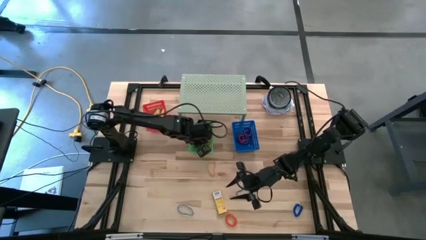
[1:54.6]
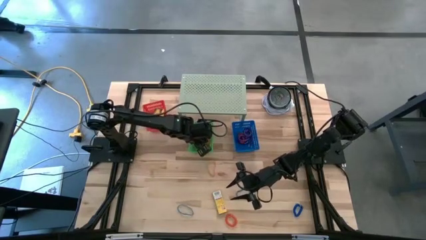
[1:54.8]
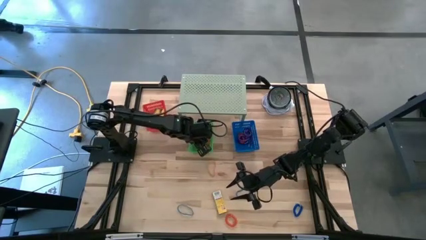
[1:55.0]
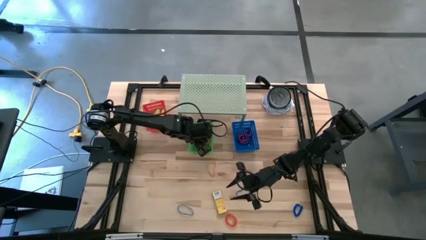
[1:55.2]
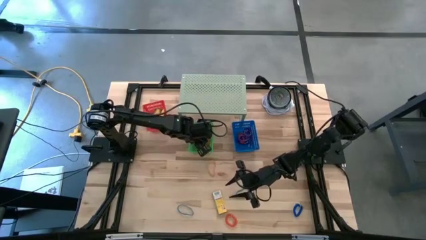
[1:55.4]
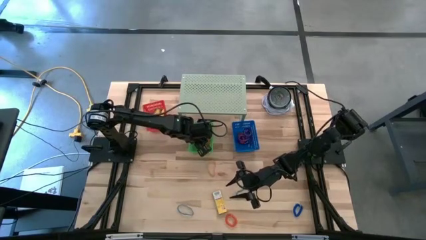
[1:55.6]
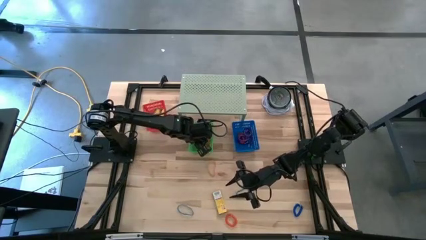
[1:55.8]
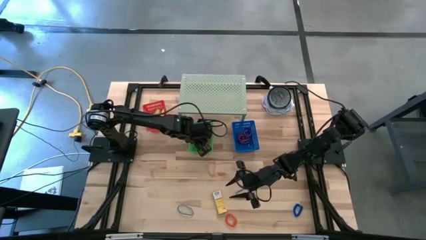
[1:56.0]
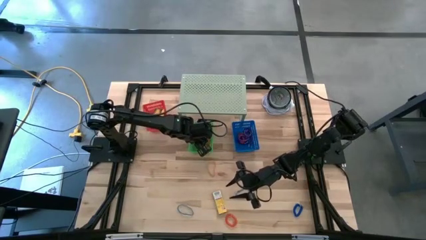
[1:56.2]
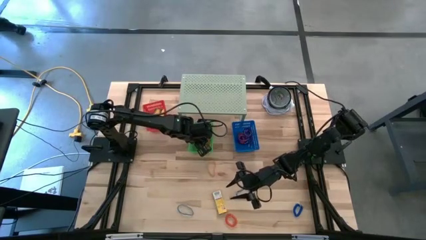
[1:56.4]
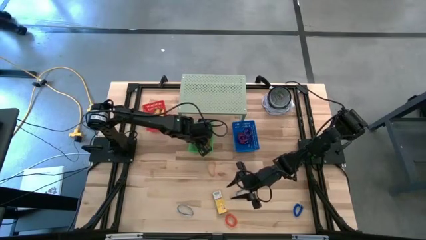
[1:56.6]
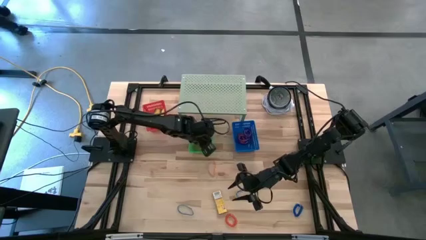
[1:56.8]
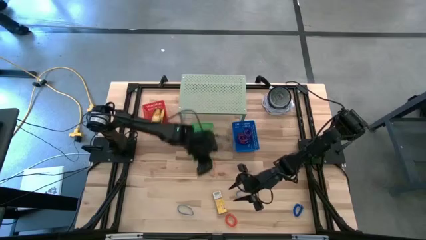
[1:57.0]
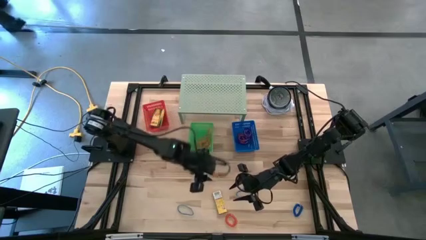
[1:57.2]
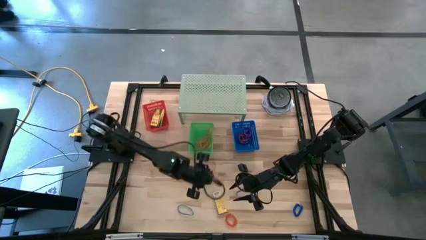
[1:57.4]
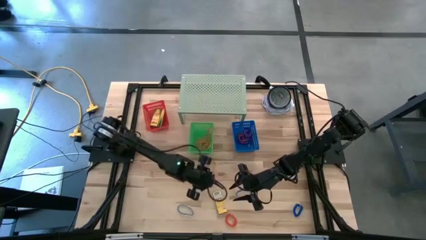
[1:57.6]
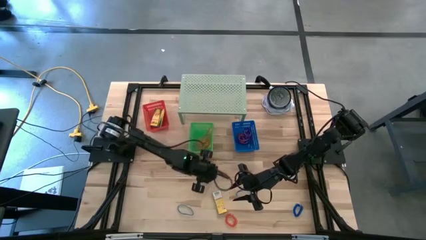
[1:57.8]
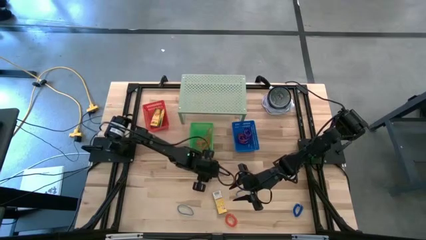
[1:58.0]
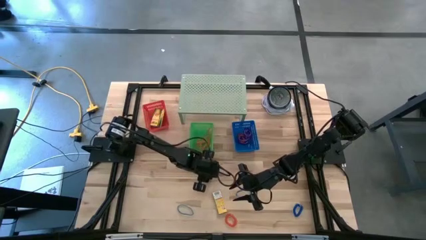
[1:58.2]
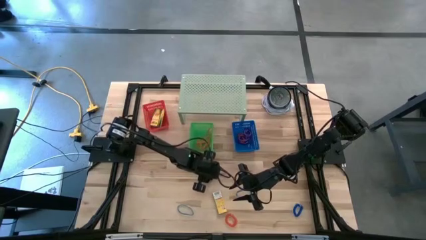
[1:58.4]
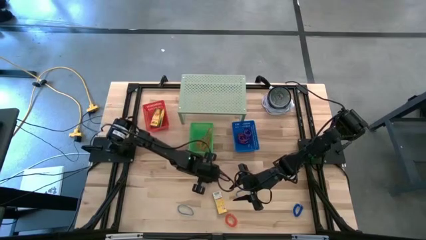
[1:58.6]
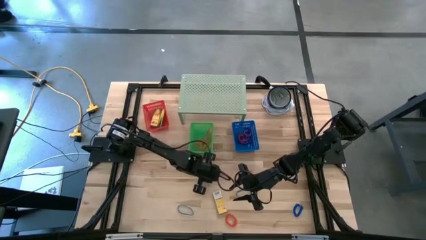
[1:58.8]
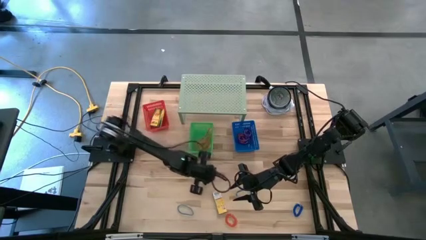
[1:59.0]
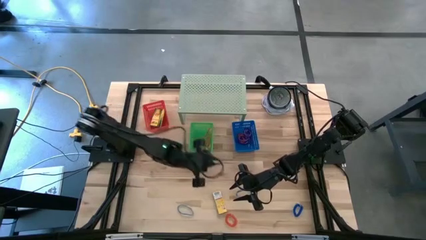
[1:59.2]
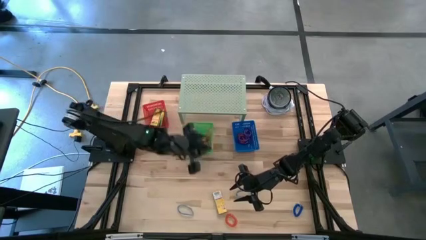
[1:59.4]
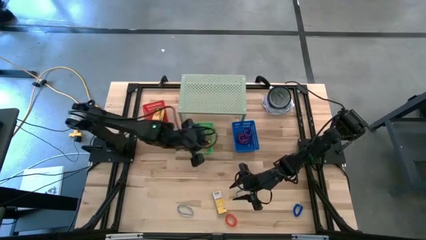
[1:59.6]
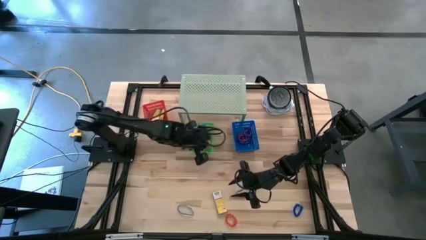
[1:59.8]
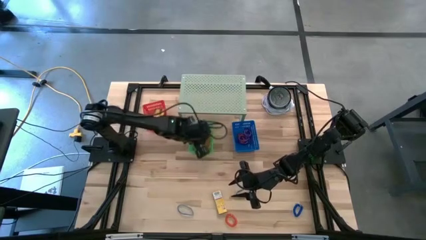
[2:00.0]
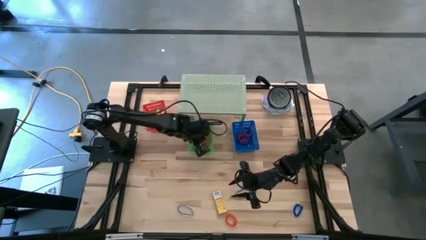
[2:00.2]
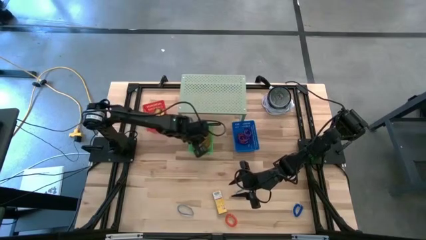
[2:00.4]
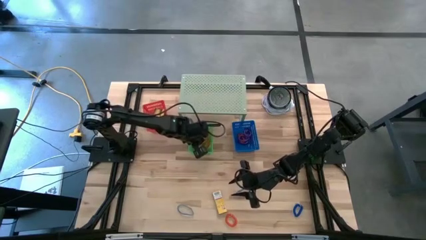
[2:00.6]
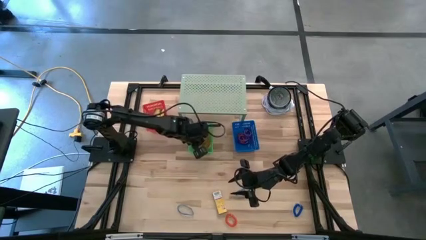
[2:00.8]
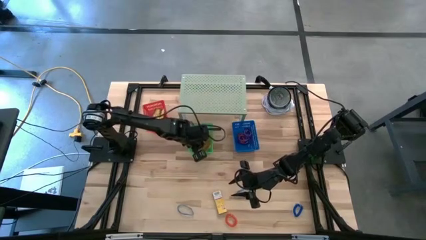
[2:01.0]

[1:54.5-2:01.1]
Task: Pick & Place Office Desk Supplies
Put the orange rubber band into the green bin

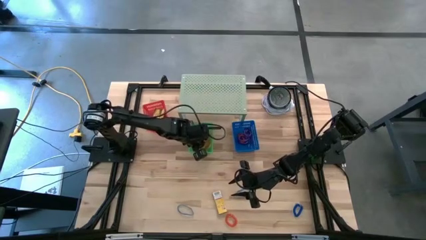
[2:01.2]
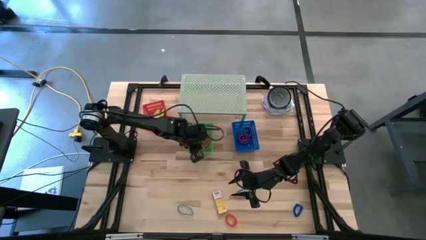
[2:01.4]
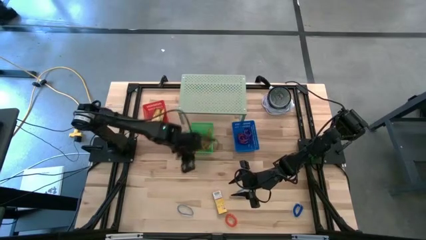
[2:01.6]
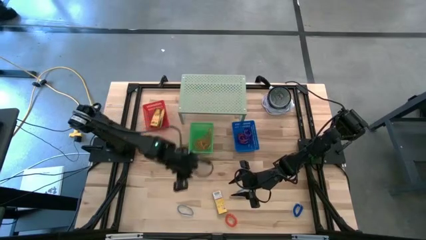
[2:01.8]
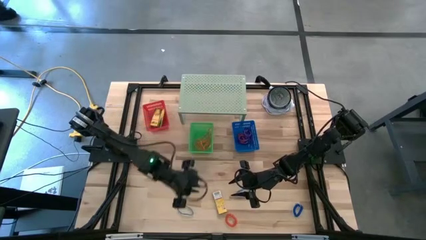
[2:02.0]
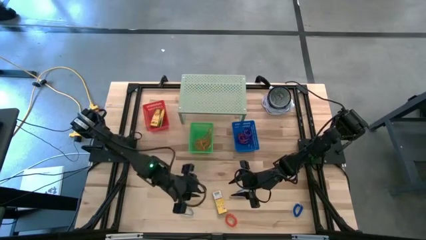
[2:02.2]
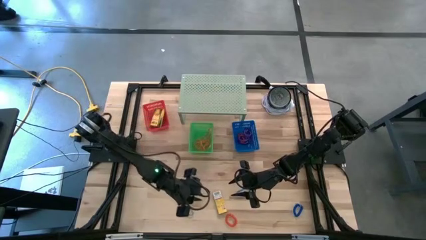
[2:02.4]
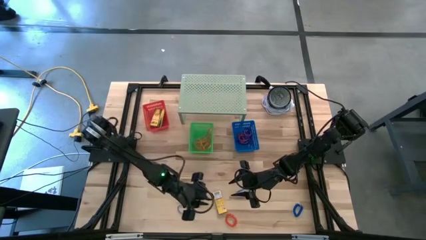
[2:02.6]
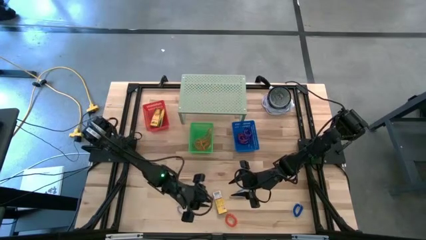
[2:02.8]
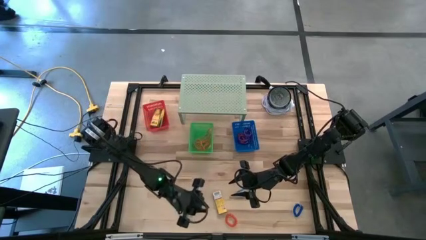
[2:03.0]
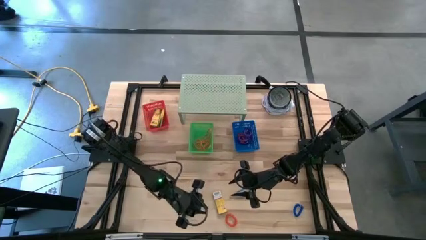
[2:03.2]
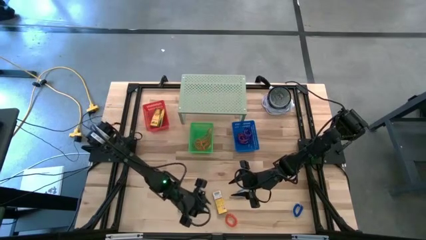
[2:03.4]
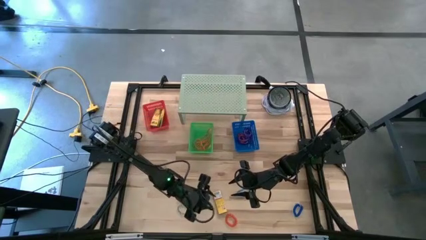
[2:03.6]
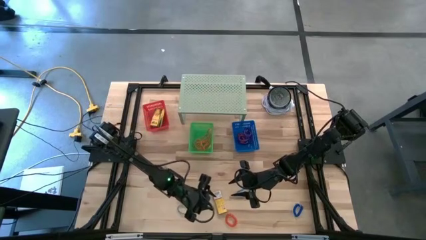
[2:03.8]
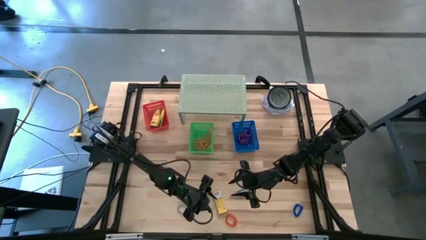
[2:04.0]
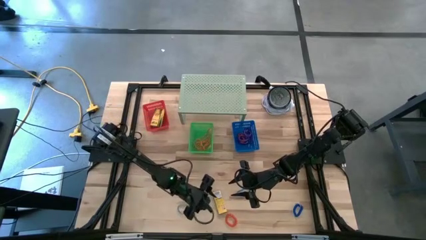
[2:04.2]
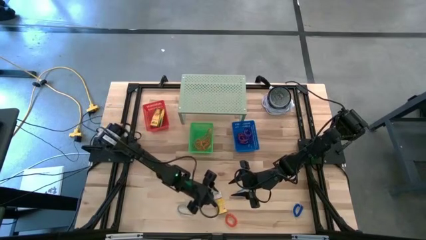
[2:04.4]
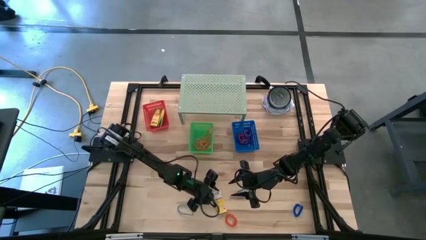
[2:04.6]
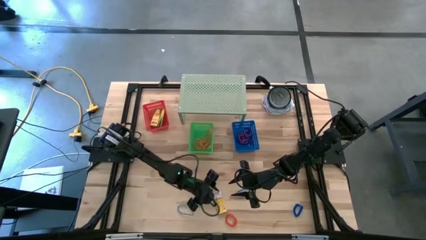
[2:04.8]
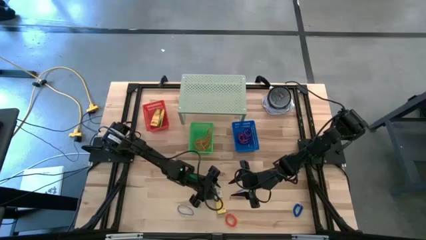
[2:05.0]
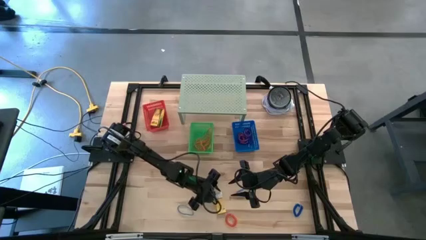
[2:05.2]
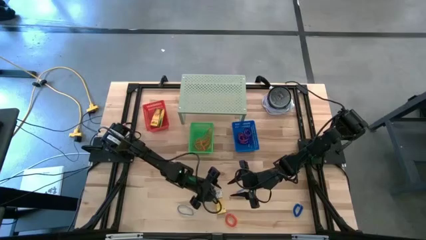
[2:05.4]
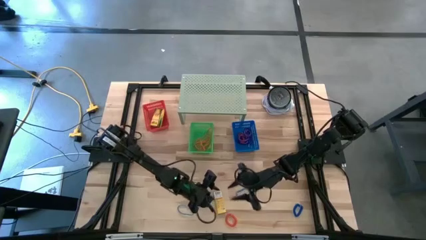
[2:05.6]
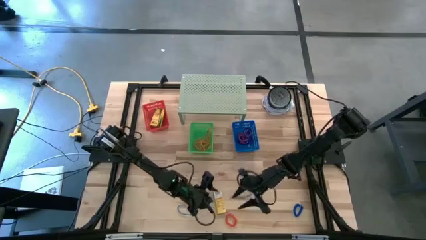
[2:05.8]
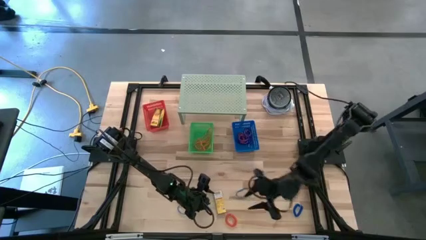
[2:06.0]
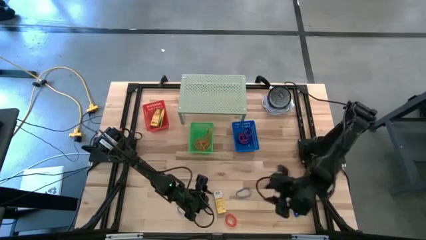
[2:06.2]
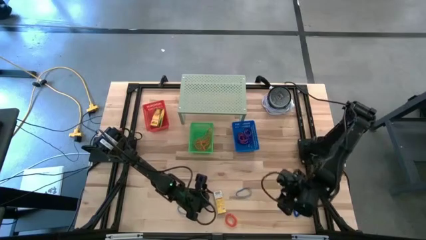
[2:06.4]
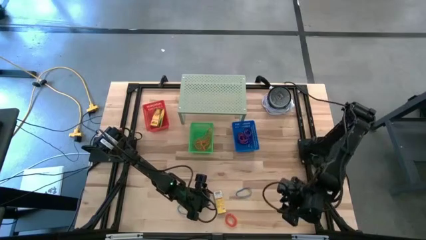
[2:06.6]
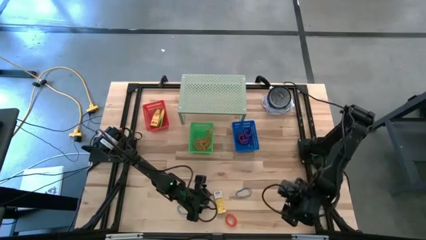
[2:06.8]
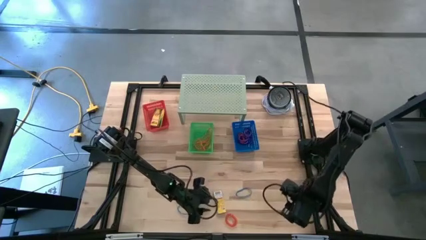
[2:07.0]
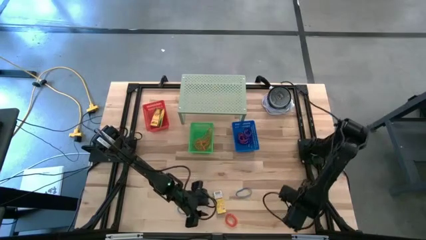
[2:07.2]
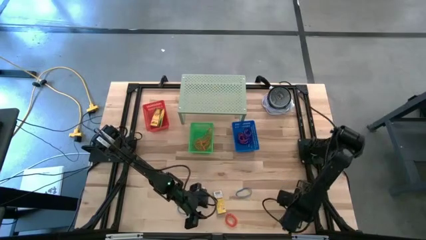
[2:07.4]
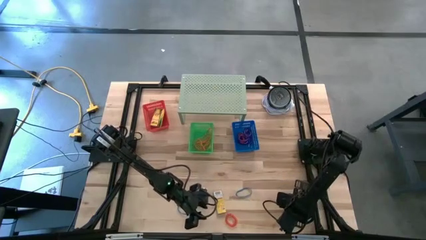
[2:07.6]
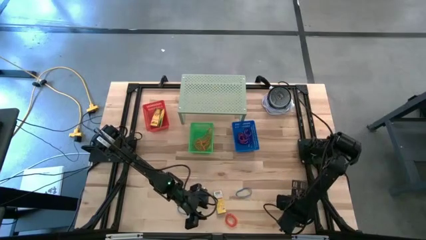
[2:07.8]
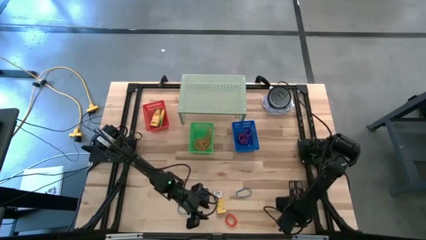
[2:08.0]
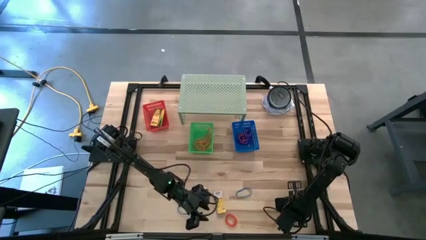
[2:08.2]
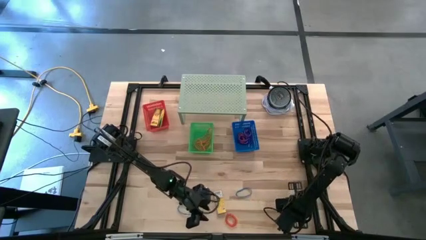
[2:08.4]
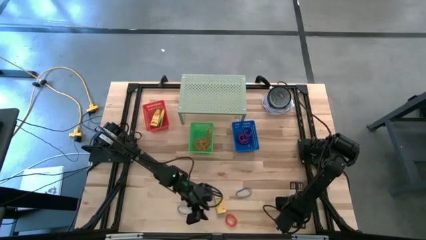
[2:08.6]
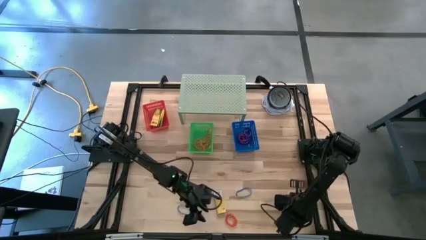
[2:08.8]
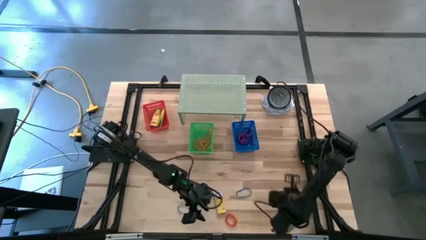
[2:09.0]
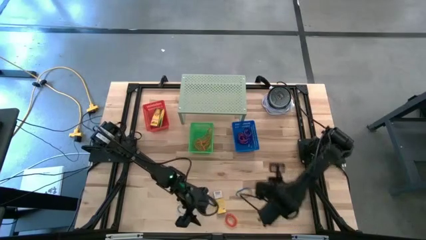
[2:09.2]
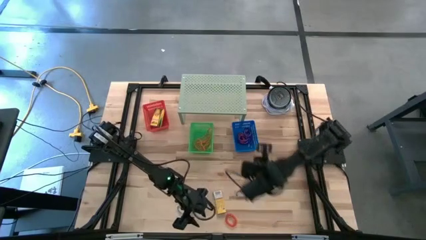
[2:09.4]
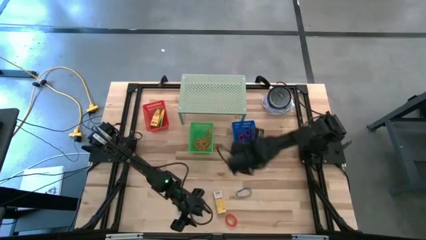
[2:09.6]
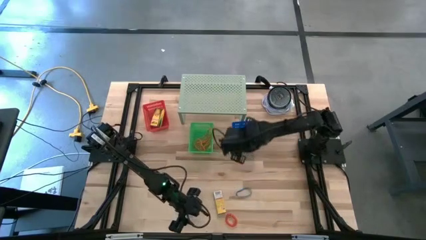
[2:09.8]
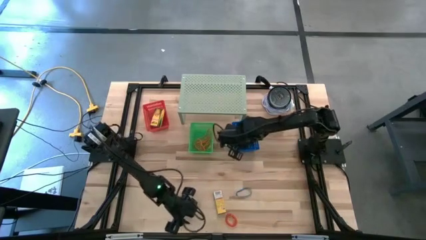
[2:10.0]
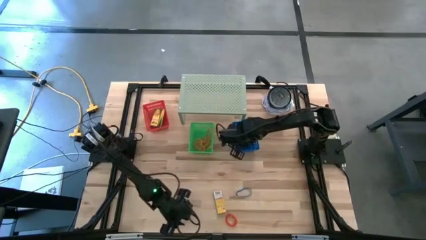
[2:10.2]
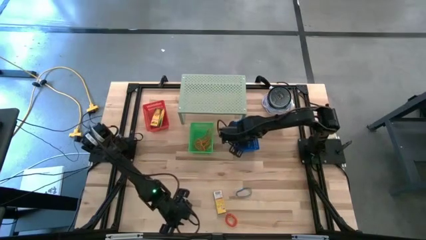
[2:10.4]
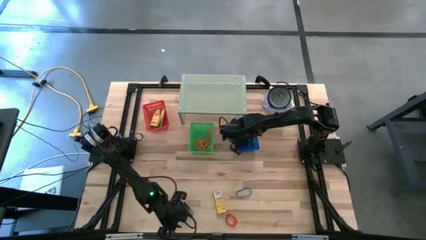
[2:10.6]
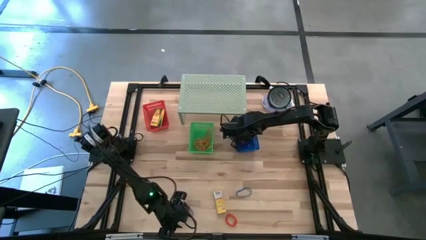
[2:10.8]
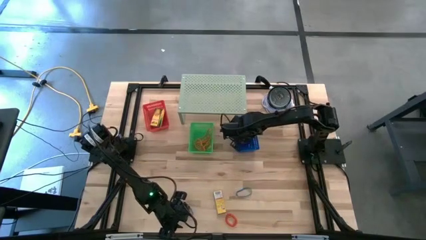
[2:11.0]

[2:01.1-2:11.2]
Put the blue spring keychain into the blue bin
